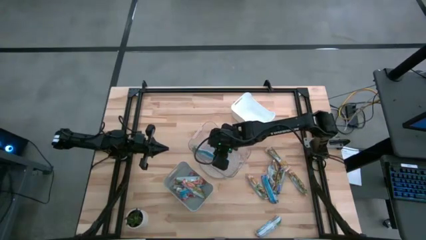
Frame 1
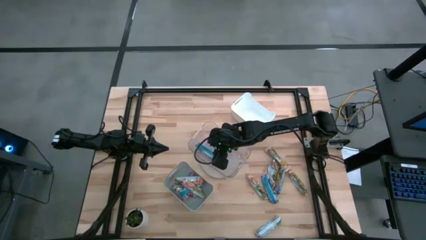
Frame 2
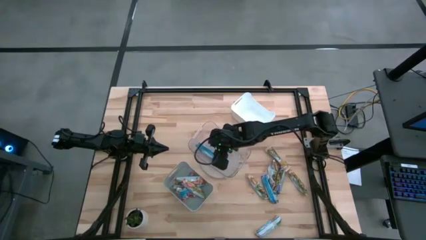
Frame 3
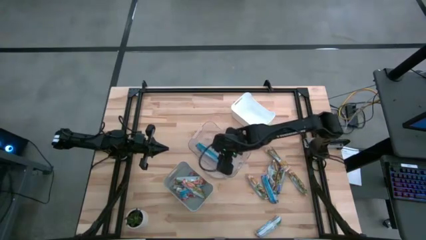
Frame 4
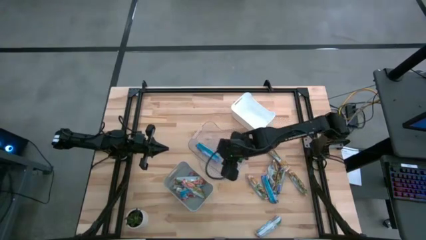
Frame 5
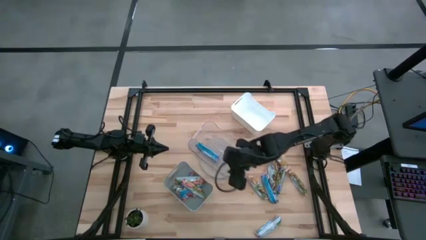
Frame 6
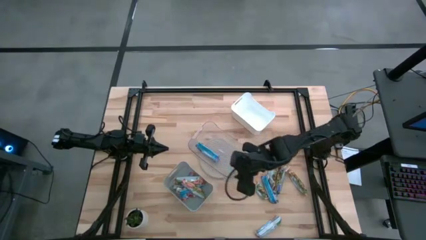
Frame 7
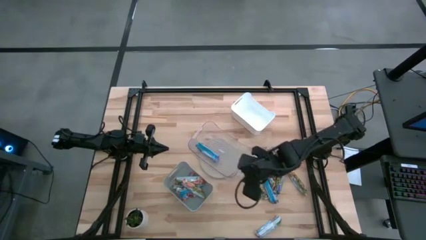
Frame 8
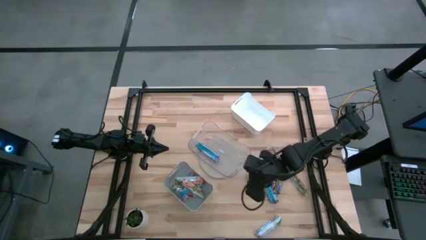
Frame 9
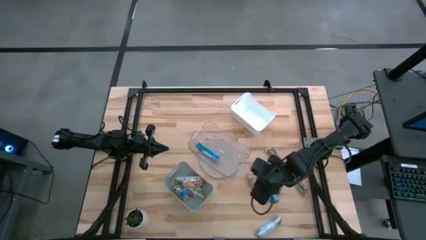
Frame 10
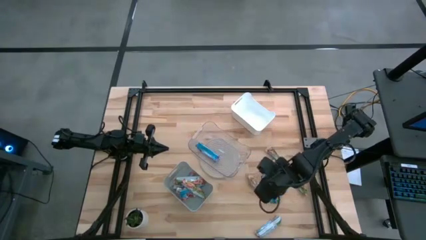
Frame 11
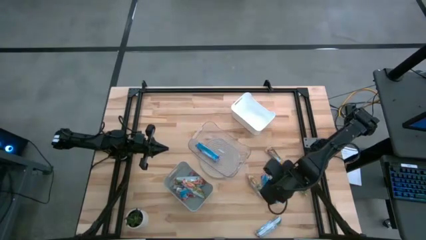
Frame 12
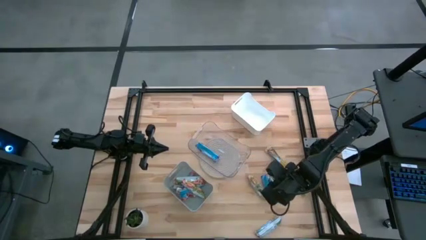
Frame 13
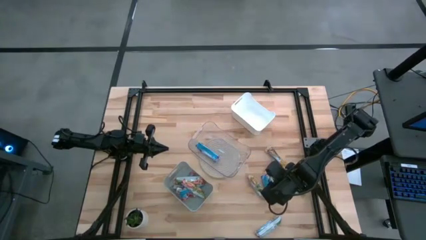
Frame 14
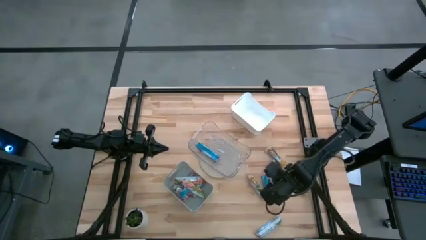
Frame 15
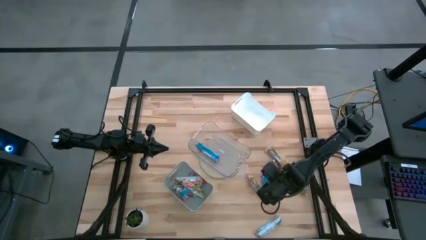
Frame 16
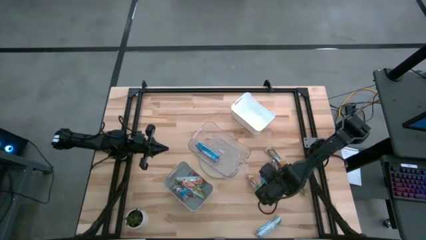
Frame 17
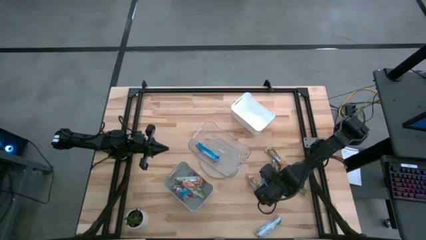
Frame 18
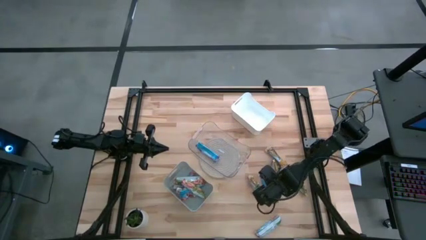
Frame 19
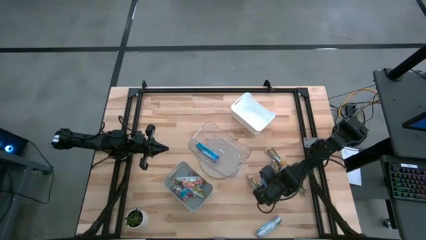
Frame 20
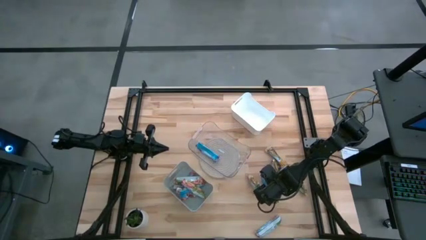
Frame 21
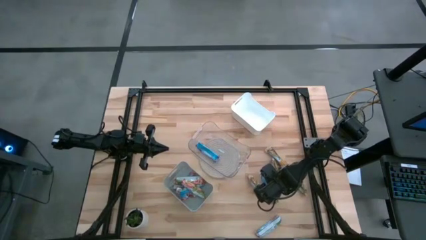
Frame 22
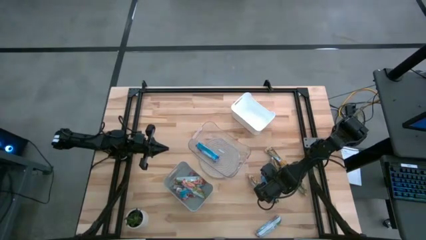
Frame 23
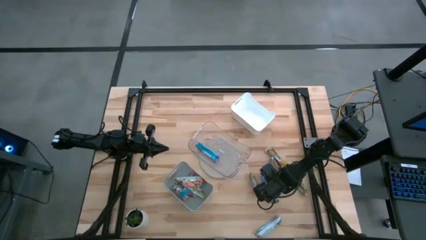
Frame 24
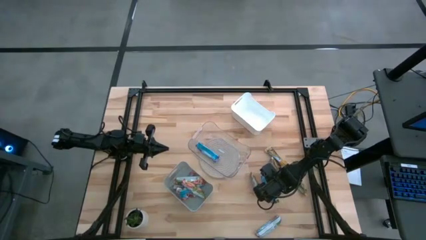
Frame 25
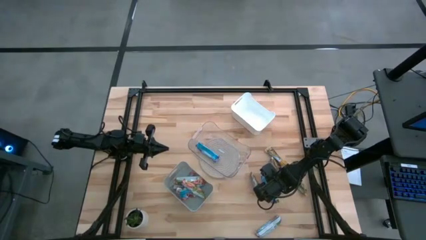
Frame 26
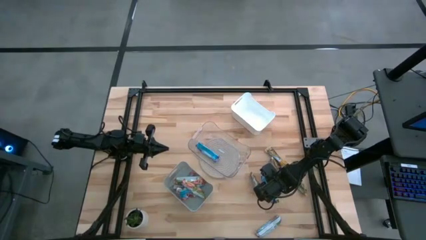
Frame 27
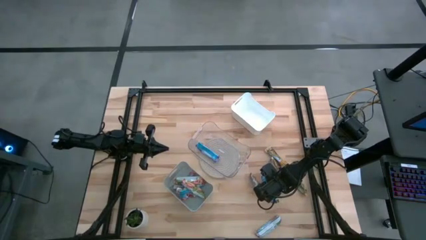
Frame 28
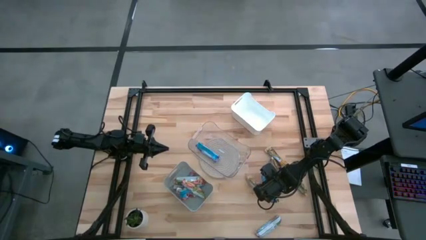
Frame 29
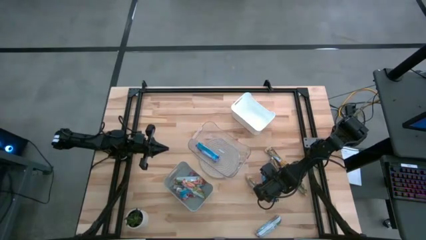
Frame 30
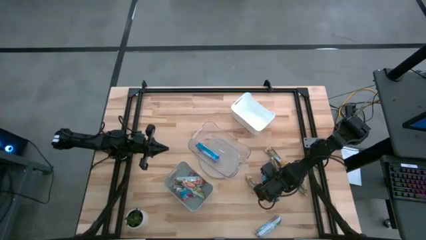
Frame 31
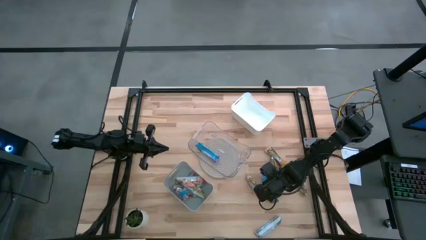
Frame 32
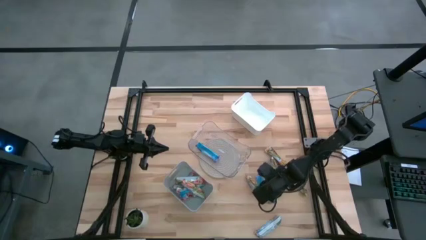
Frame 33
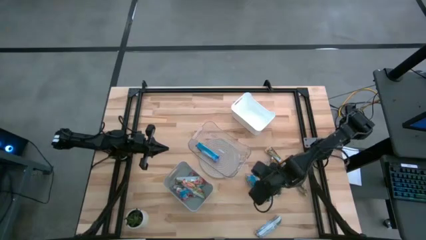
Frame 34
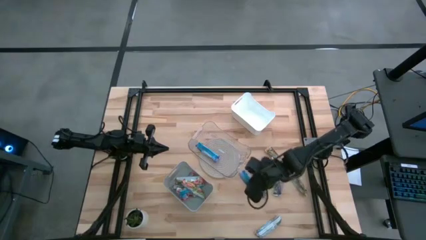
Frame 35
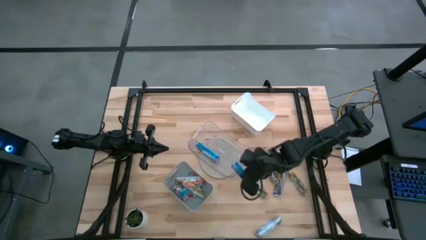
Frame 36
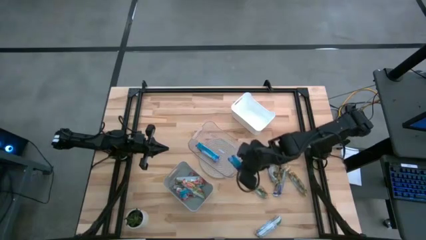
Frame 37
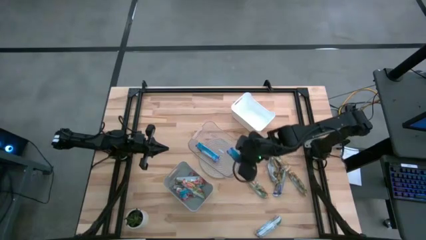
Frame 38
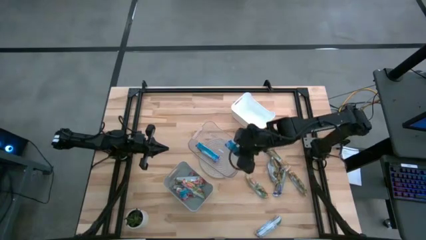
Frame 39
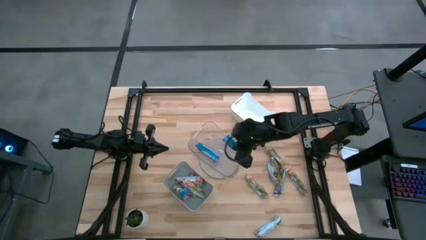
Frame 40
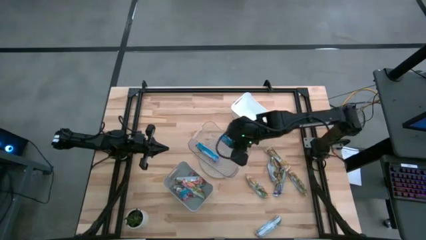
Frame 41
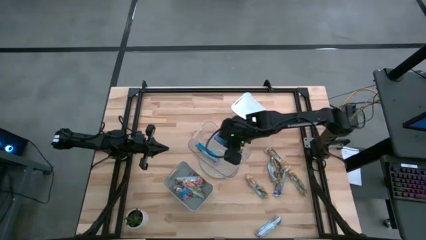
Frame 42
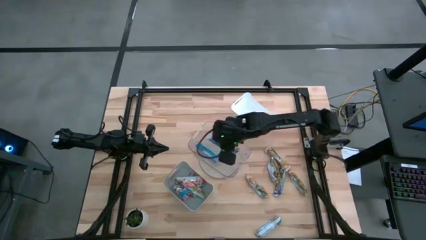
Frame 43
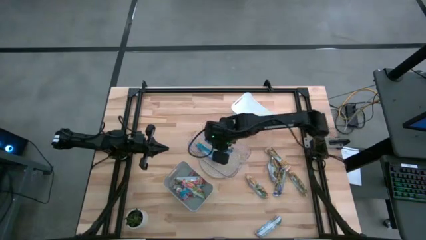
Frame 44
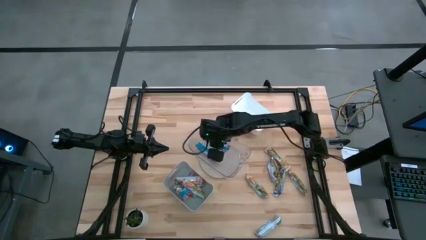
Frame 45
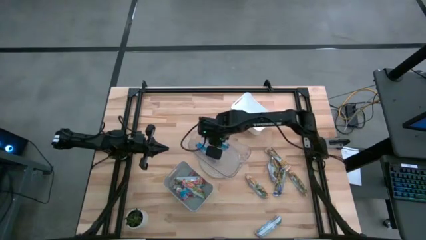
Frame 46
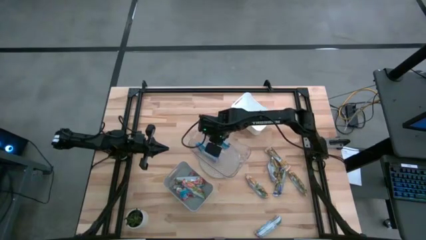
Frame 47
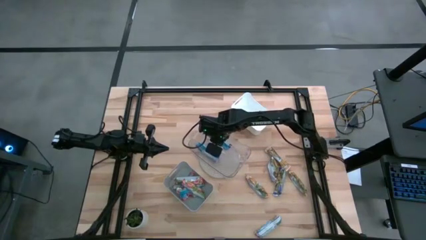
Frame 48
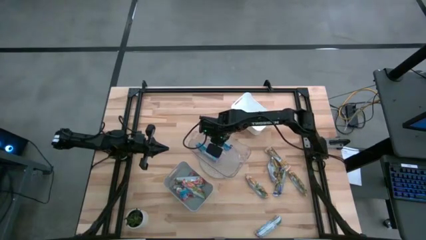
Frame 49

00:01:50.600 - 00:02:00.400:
Task: Pick and place Granola Bars by type
Put the blue granola bar into the transparent bin

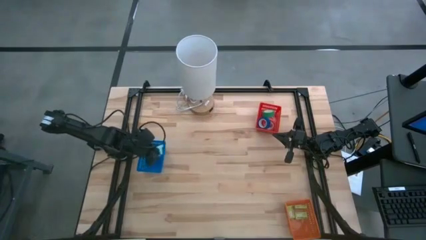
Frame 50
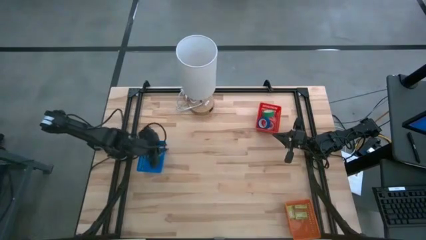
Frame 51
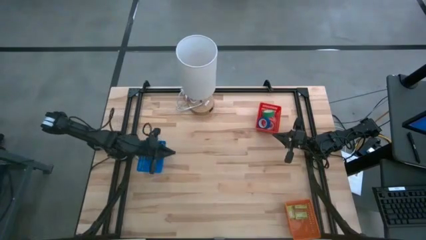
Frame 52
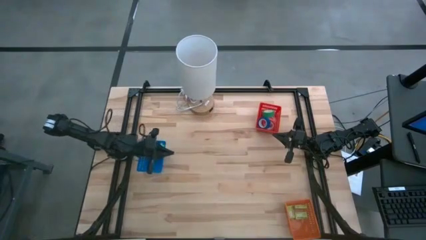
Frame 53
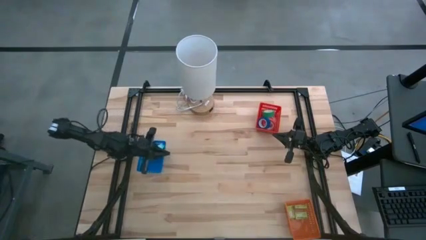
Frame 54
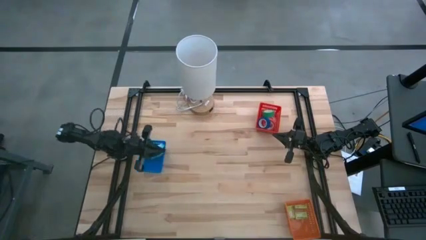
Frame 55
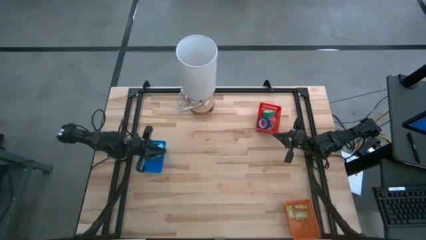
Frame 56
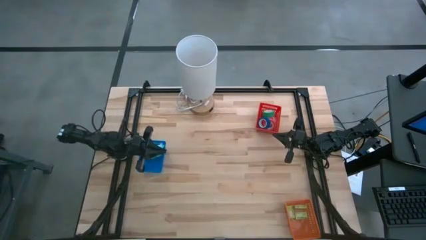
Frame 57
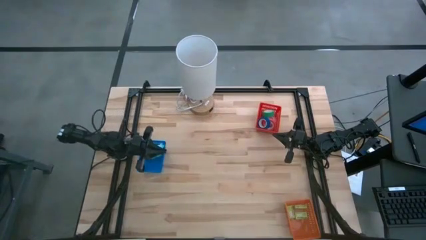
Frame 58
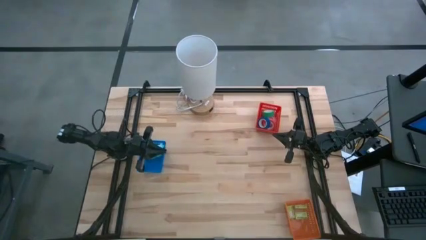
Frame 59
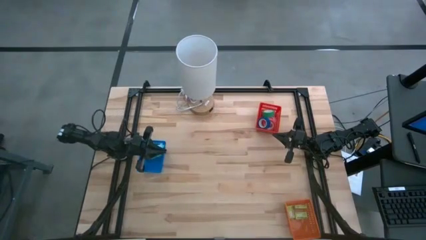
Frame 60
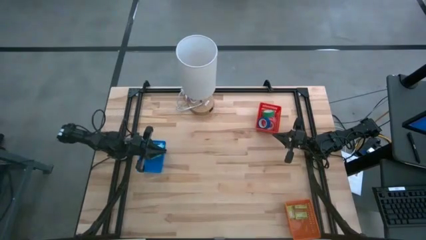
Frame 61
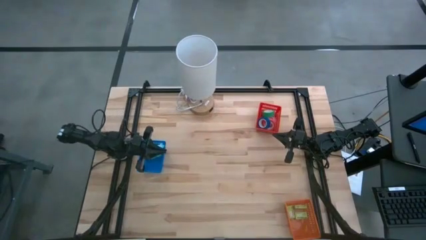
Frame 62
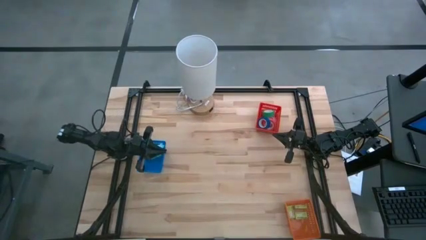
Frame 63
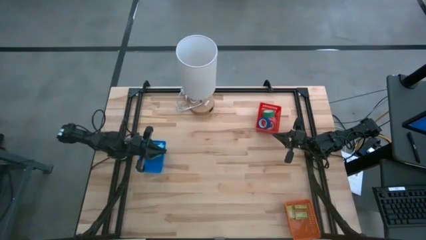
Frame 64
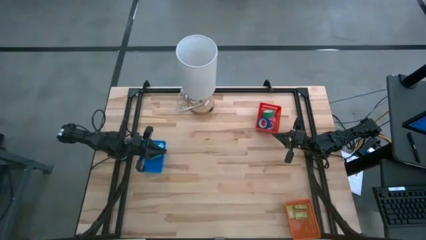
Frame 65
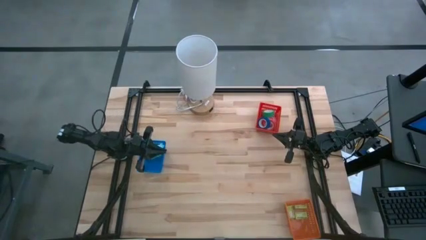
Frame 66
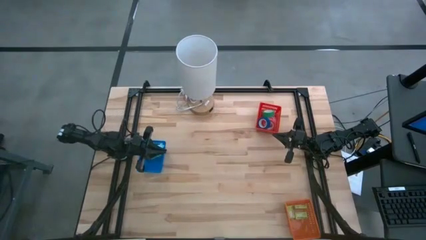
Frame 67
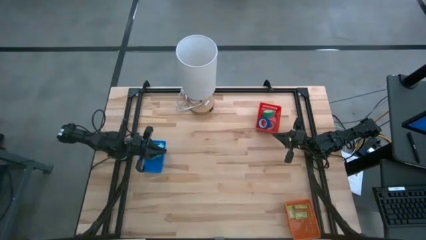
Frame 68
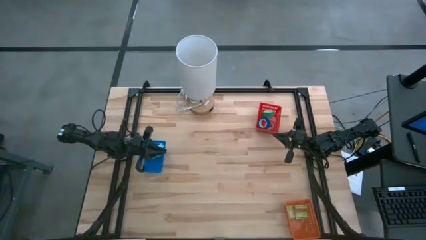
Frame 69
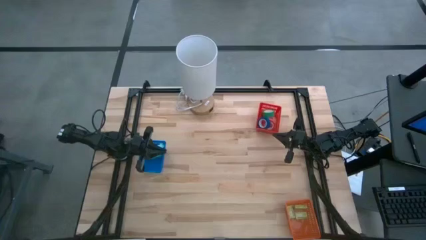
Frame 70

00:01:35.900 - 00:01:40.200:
Task: Pick and place Stapler, Stapler remover, tape
Return to Home Position

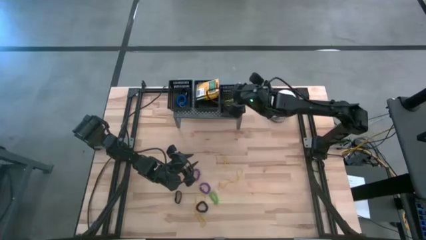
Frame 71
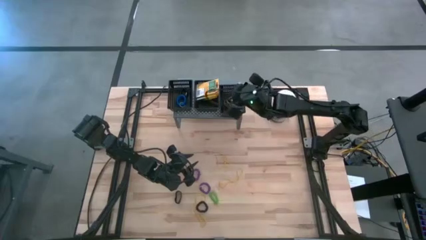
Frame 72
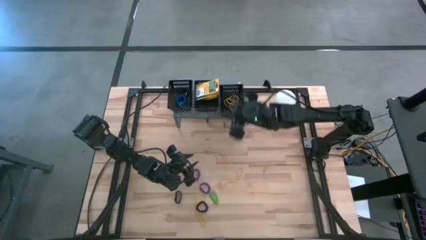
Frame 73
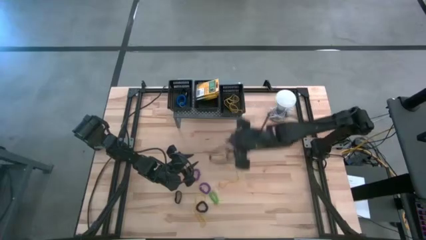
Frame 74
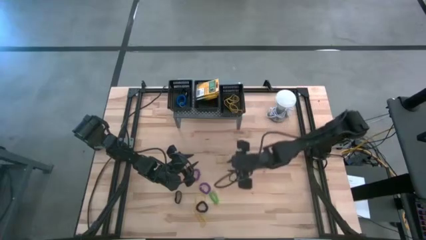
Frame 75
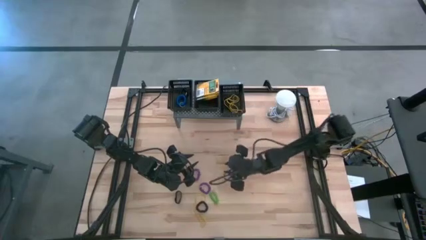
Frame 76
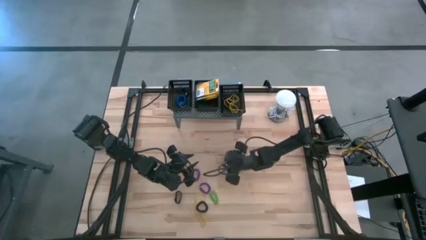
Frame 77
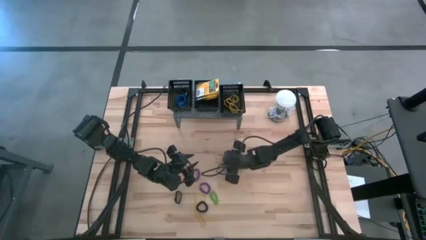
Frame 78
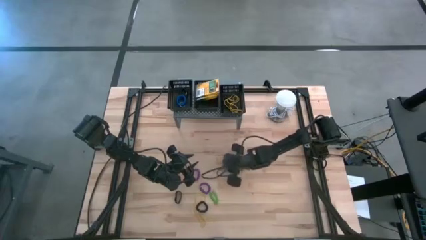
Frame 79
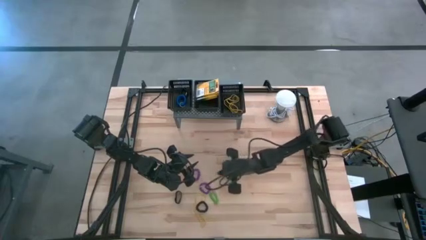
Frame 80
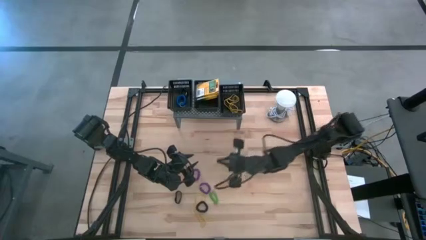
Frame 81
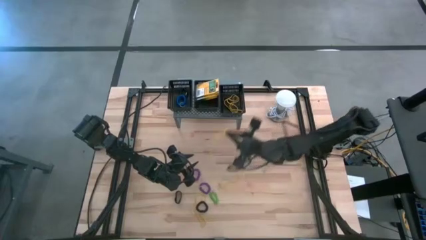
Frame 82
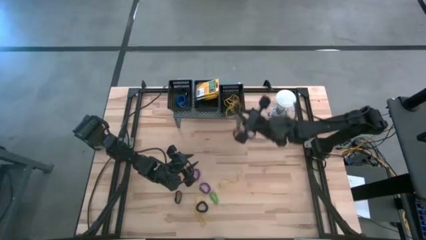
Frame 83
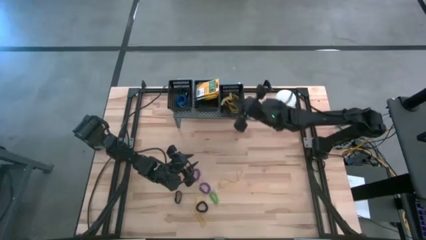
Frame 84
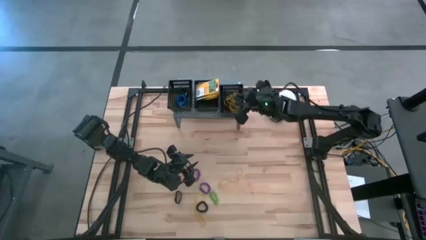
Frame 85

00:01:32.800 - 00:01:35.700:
Task: Pick & Place Office Desk Supplies
Put the yellow rubber band into the right black bin on the shelf
